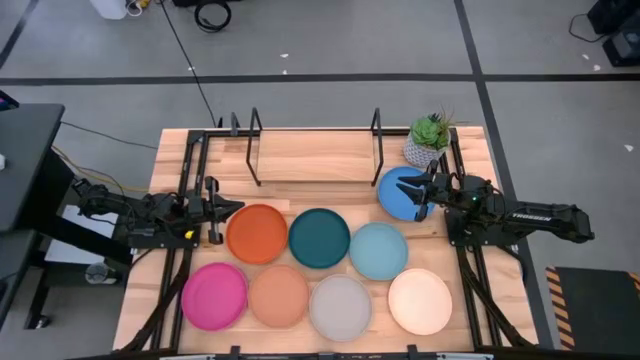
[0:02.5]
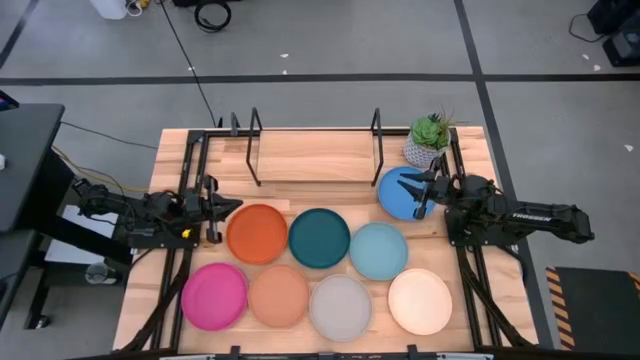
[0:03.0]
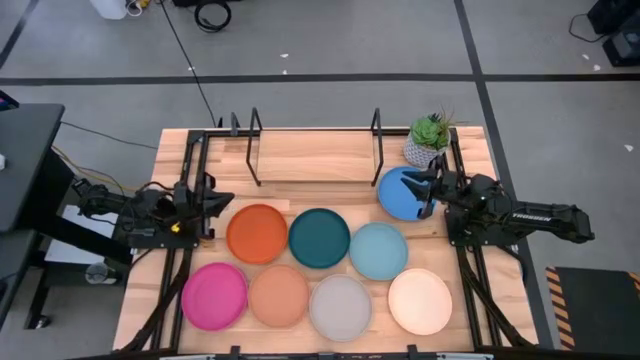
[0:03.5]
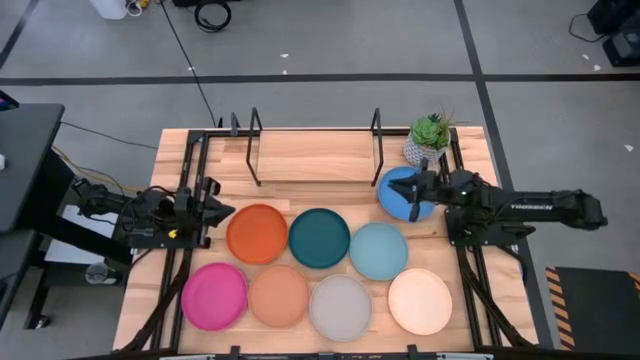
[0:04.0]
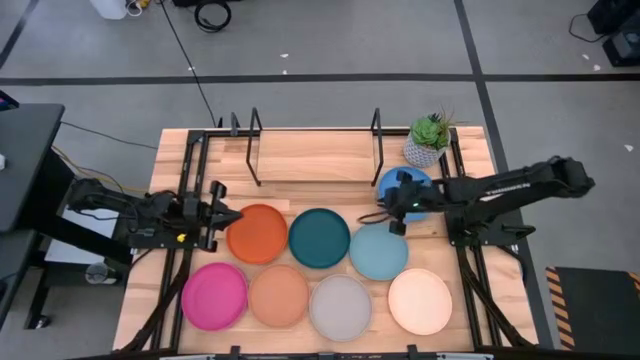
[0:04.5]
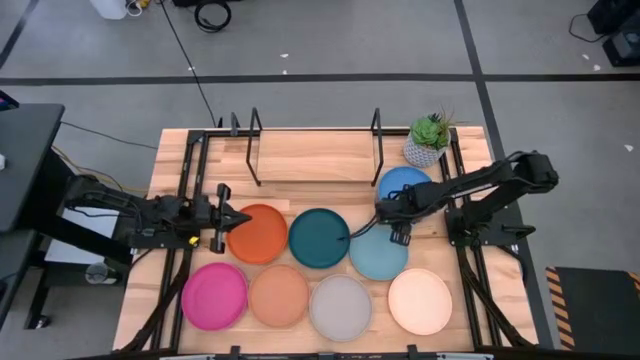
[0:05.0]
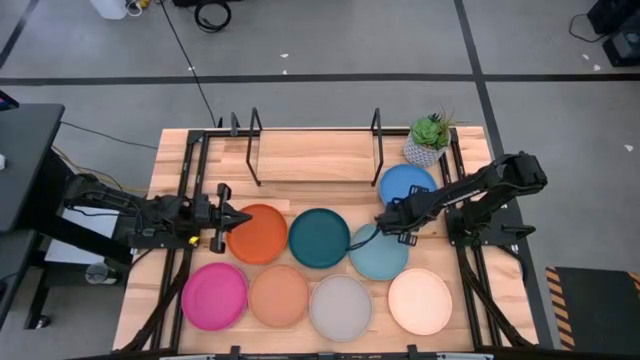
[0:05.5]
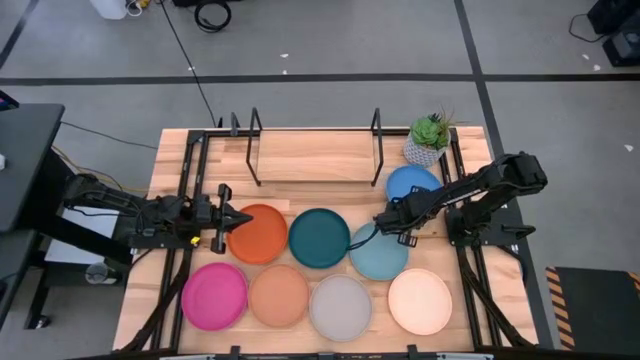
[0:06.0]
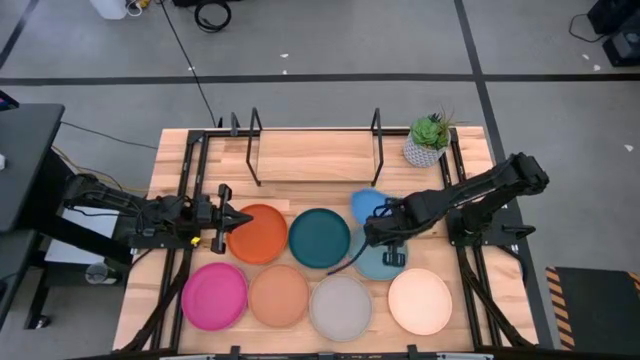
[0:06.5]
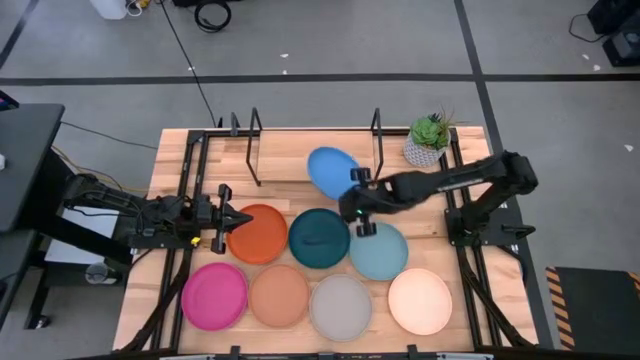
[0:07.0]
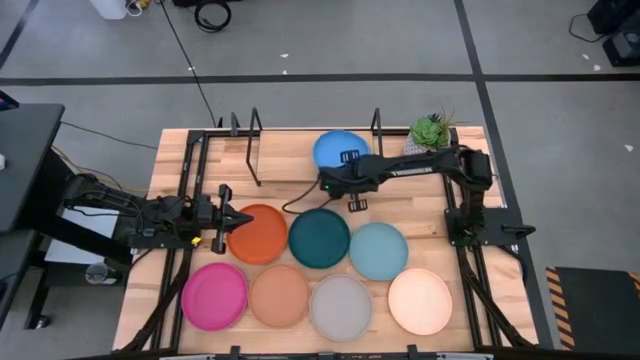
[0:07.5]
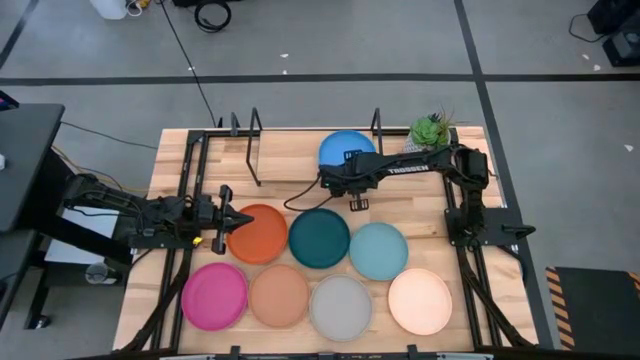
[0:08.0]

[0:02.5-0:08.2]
Task: Place and stack plates onto a shelf
Put the light blue plate on the shelf

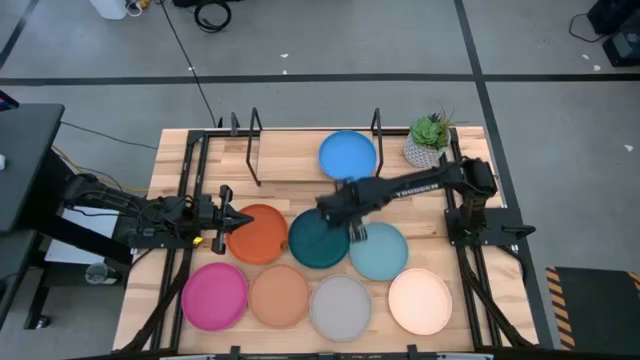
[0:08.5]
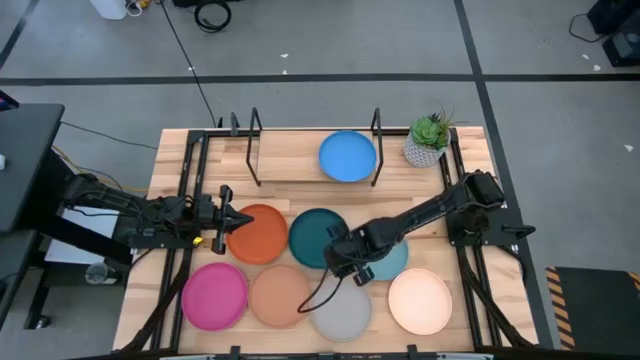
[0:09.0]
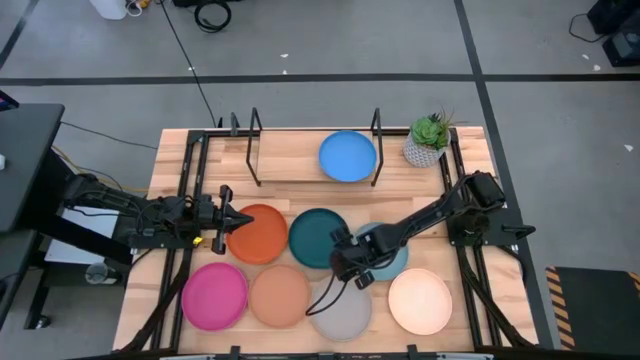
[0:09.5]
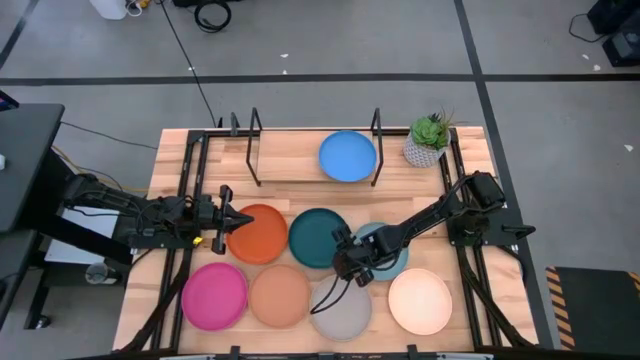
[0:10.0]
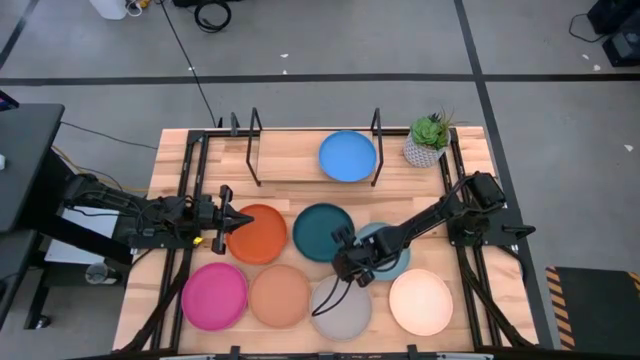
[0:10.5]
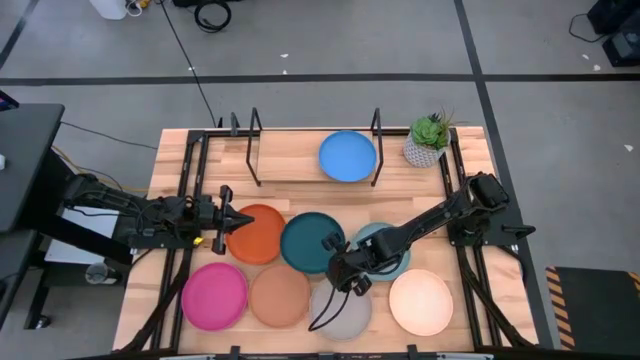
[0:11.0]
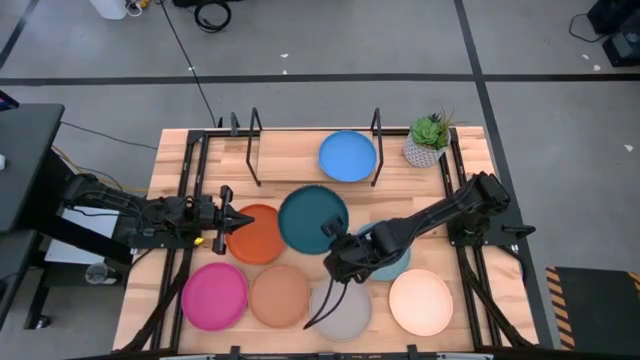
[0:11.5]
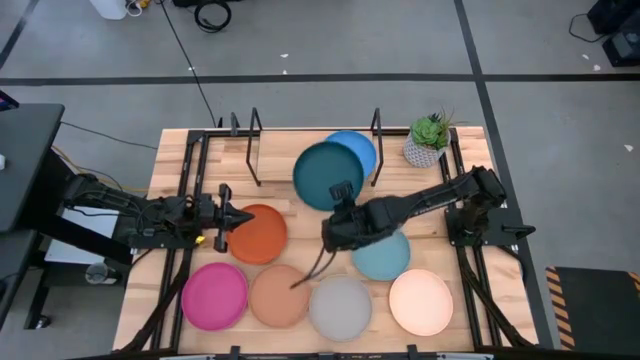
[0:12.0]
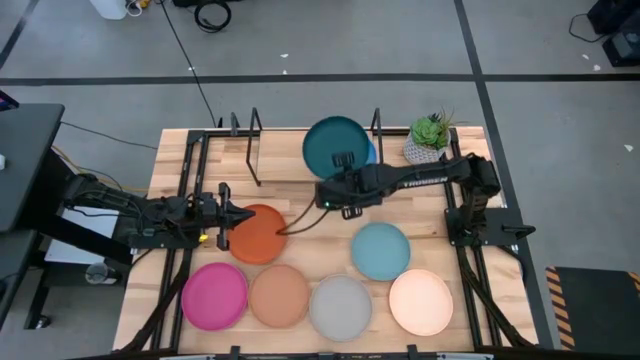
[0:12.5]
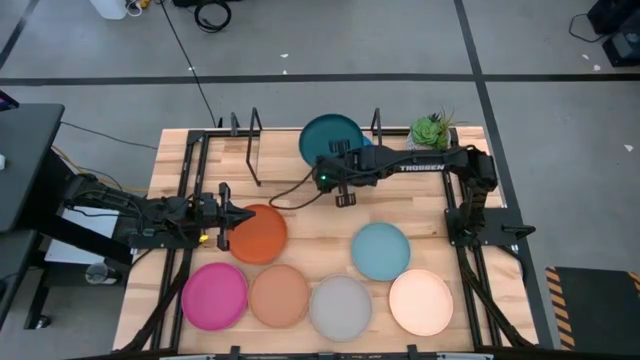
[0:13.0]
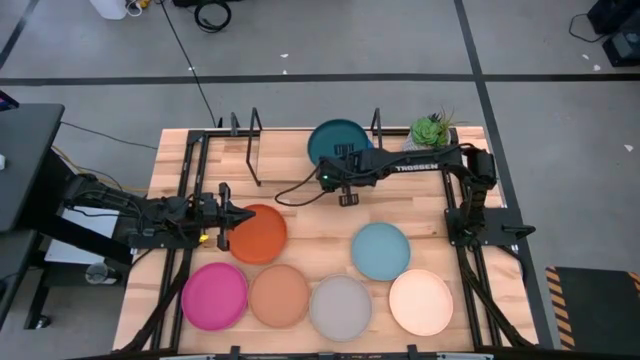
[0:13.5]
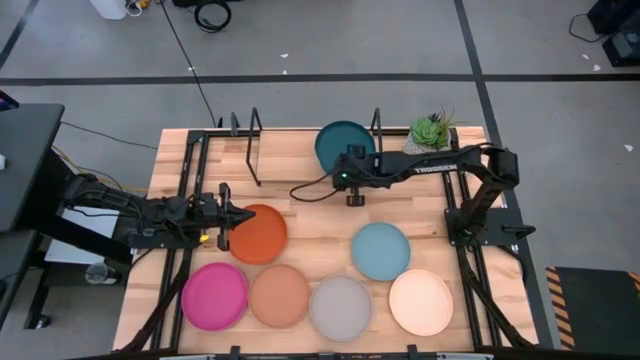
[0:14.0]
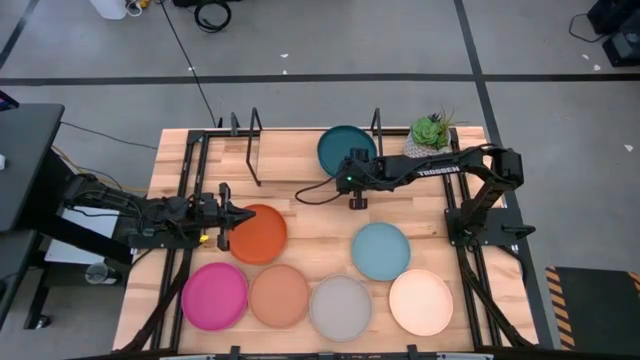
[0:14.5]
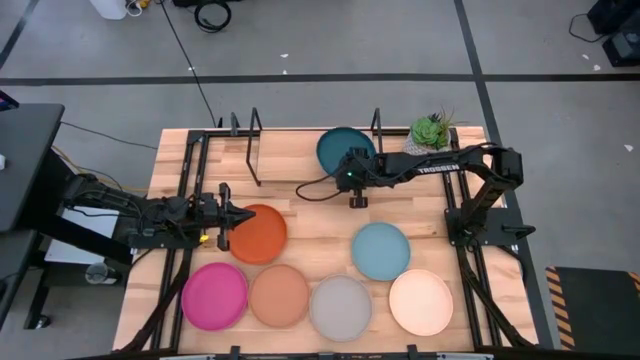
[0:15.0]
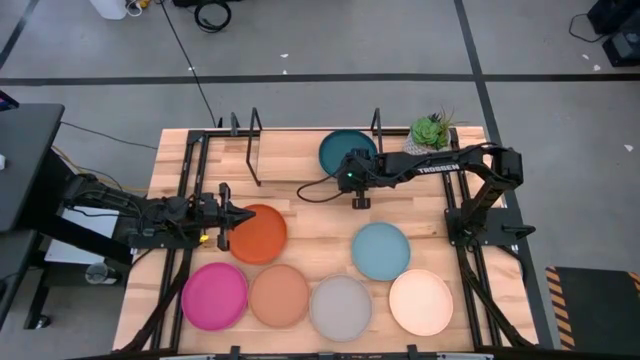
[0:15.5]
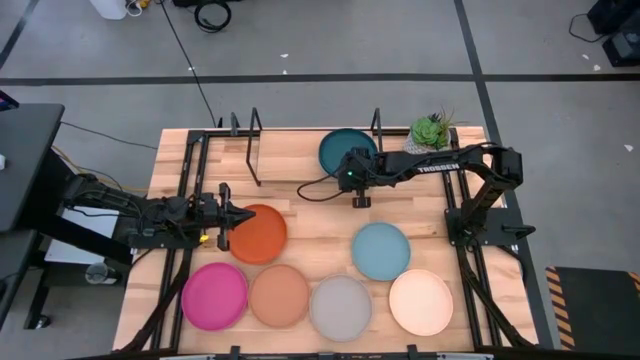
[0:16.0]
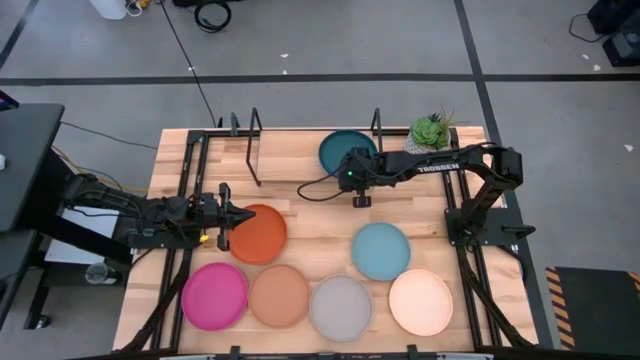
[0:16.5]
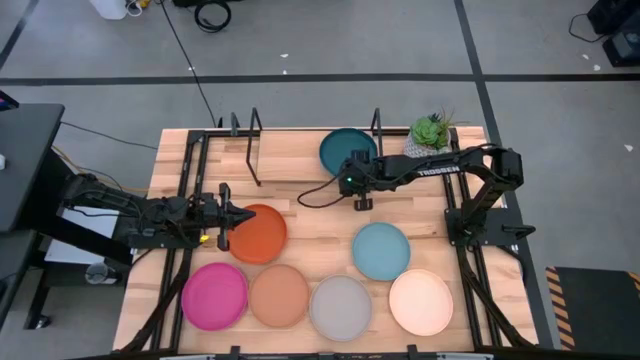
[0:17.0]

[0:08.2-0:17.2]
Stack the dark green plate on top of the light blue plate

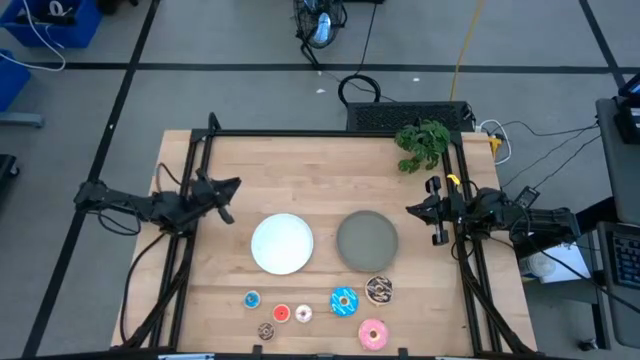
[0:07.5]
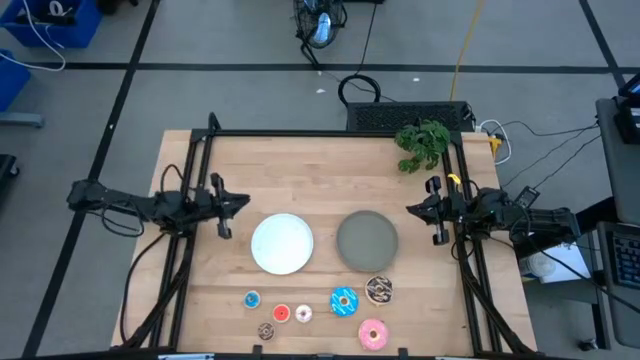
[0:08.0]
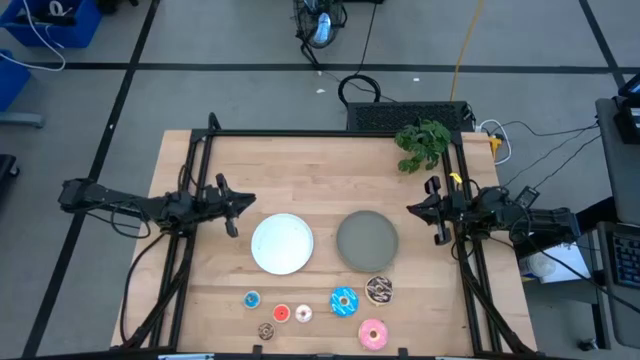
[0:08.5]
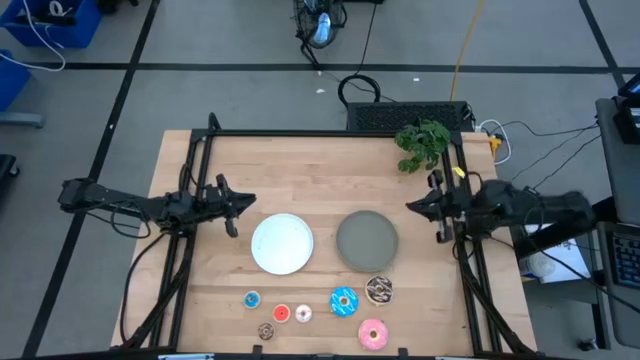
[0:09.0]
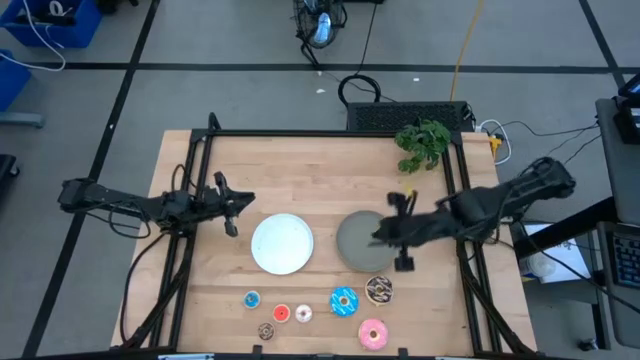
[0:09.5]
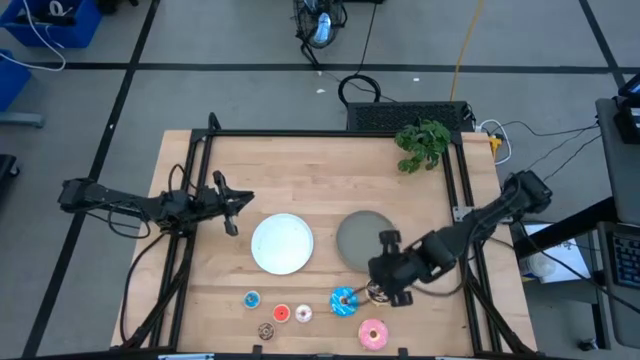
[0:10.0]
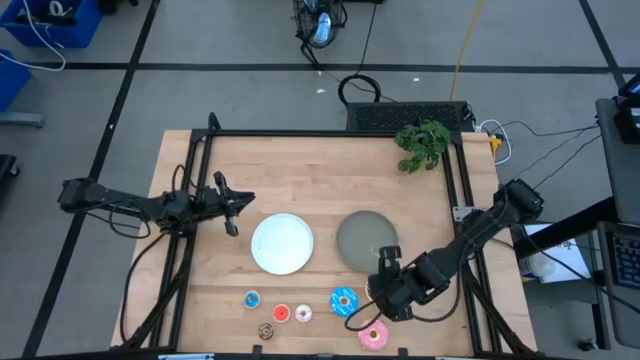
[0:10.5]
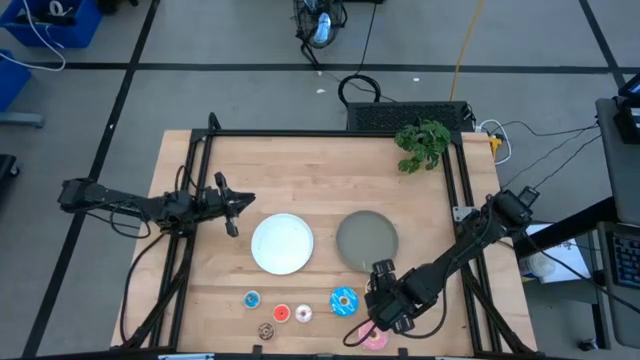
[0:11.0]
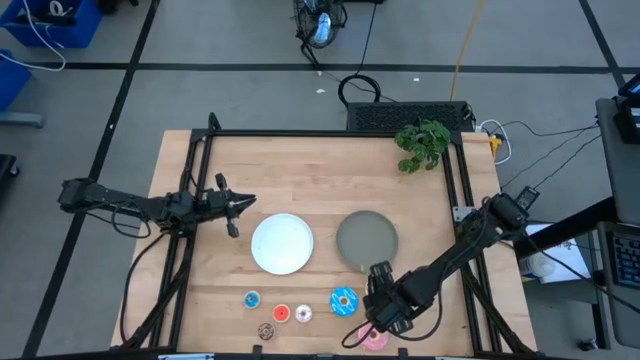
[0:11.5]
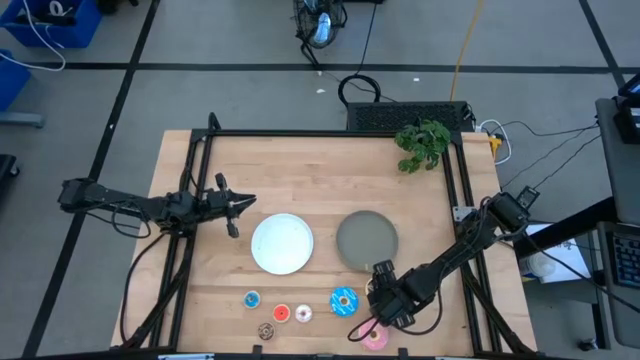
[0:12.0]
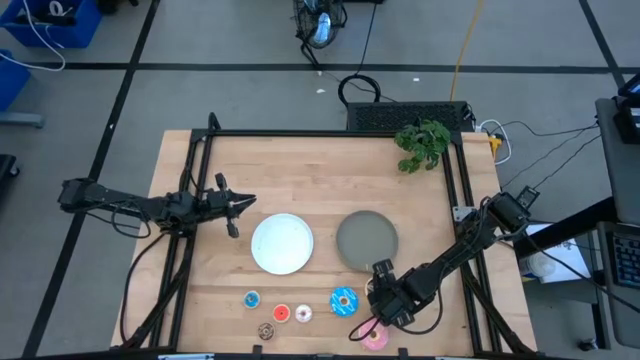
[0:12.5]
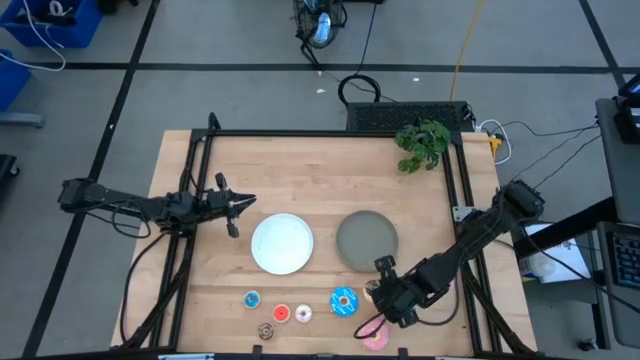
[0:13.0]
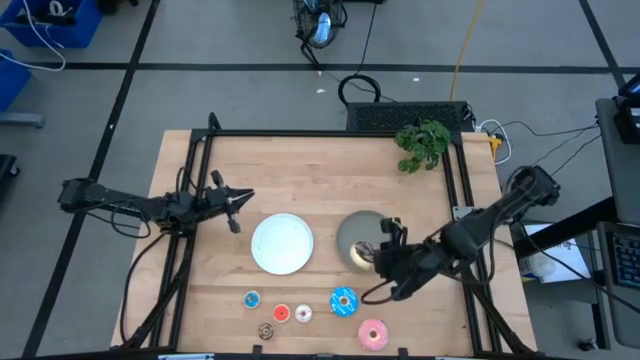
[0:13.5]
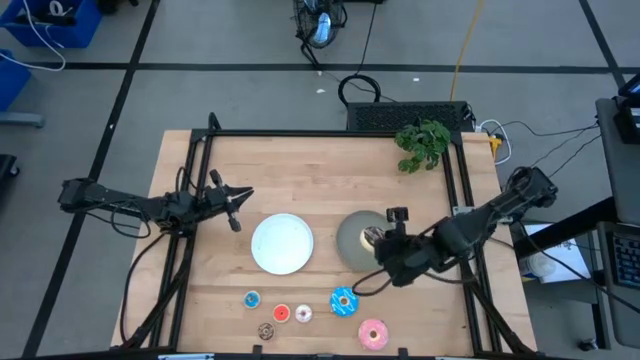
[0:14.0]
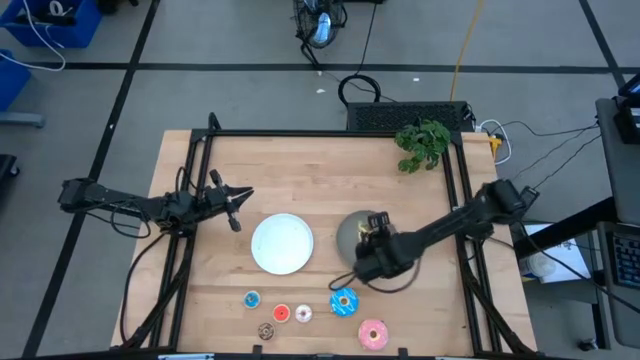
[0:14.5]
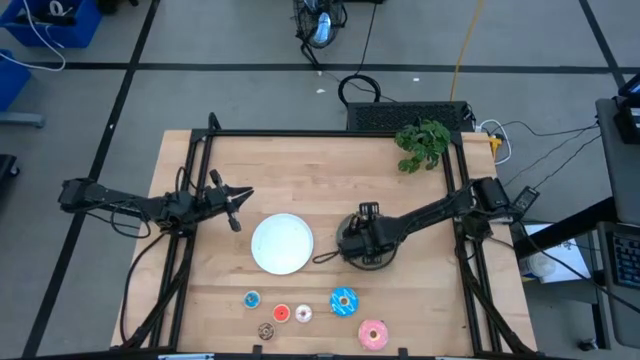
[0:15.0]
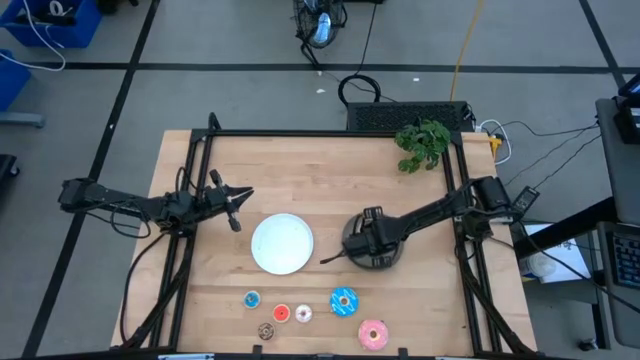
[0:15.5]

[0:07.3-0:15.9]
Task: Pick & Place donuts
Put the large black donut on the gray plate
